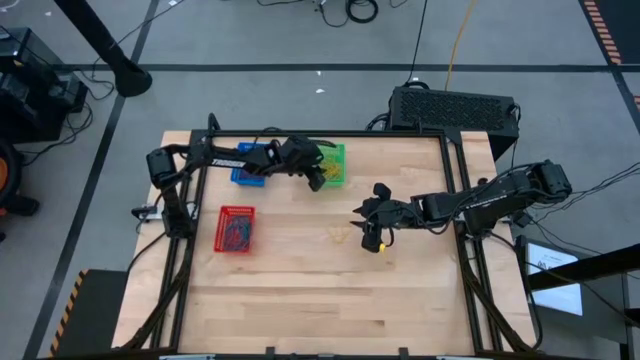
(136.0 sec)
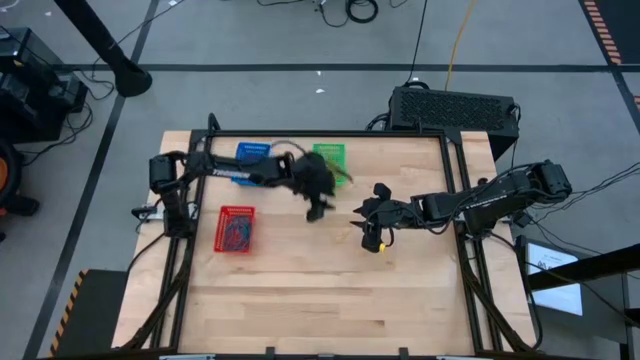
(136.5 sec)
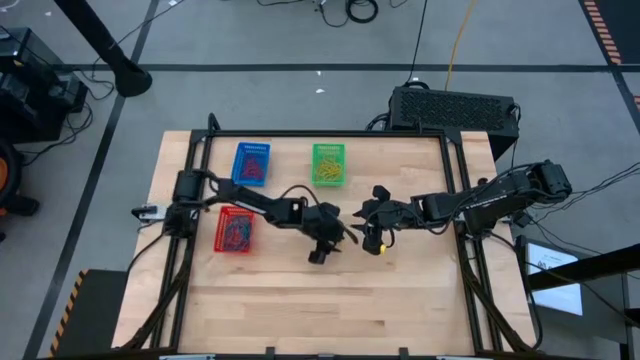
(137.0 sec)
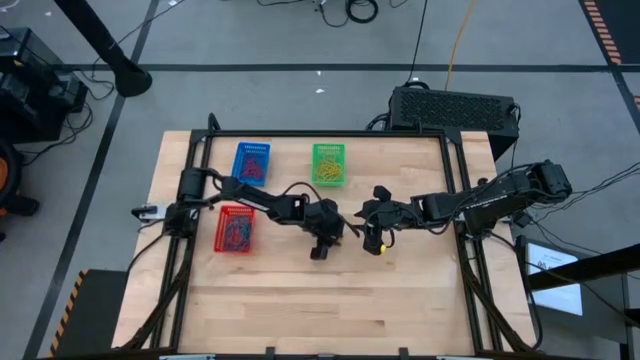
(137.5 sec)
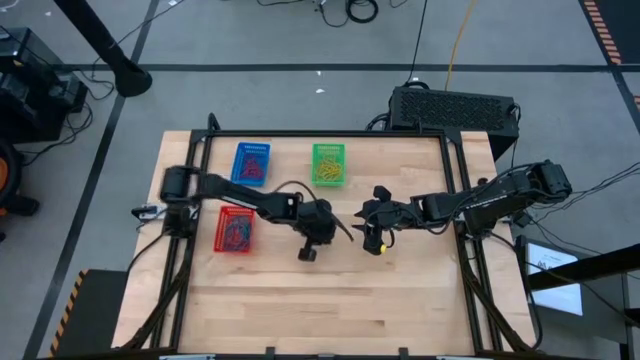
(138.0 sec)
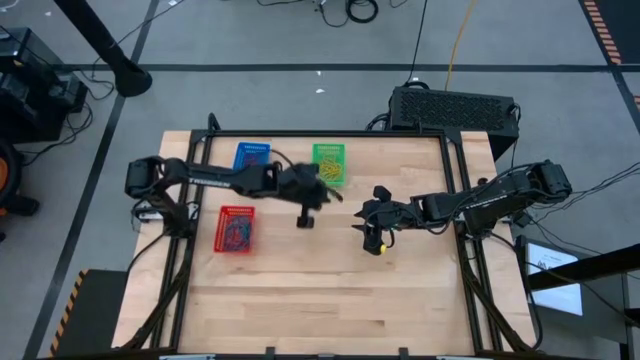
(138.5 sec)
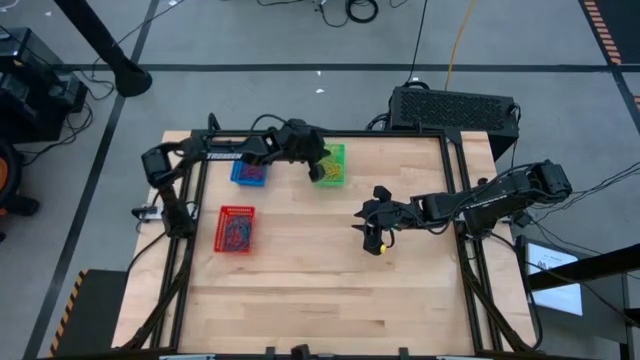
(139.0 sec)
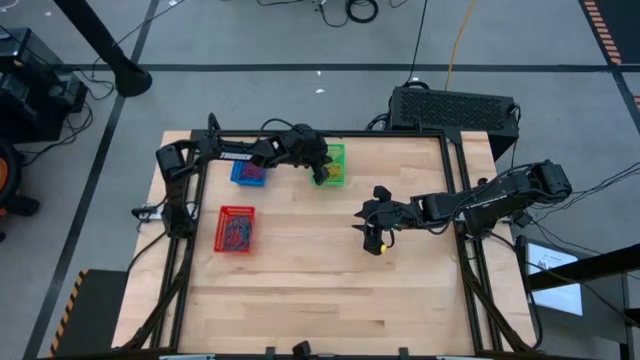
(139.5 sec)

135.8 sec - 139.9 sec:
Task: Sort rubber bands into baskets
Put the yellow rubber band into the green basket

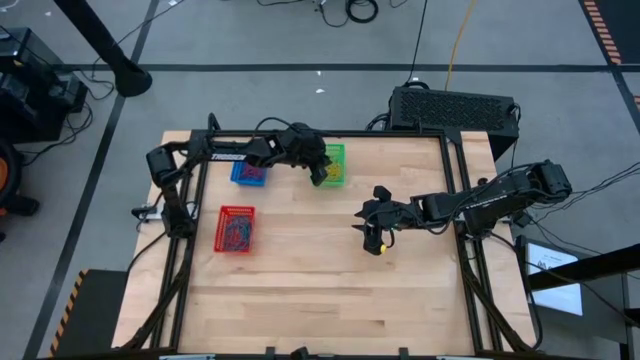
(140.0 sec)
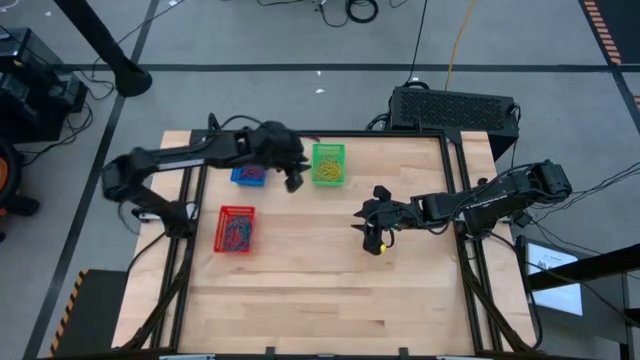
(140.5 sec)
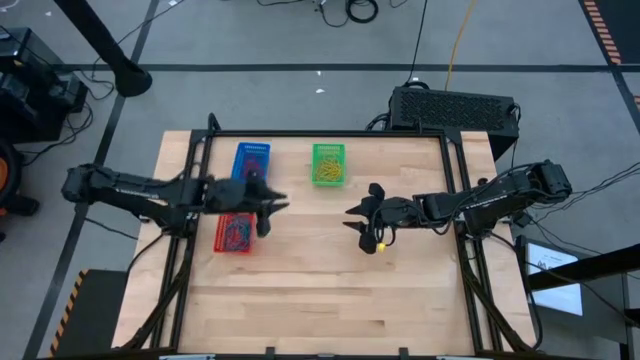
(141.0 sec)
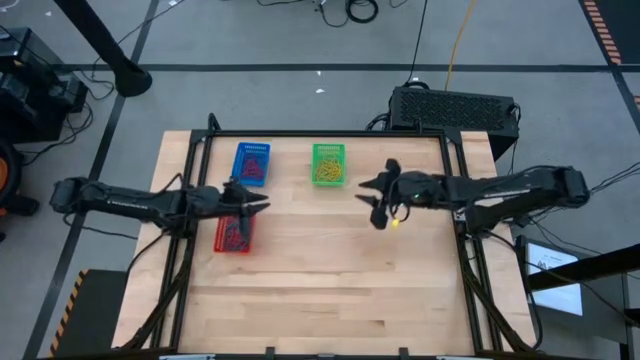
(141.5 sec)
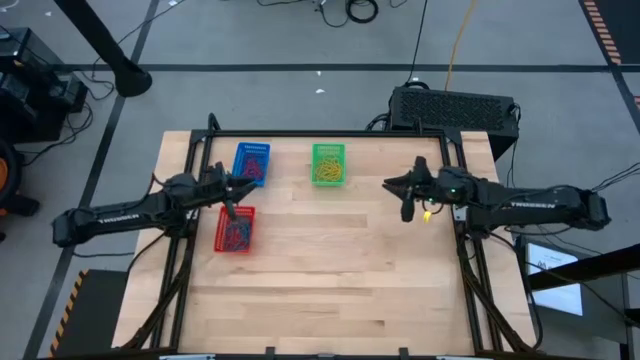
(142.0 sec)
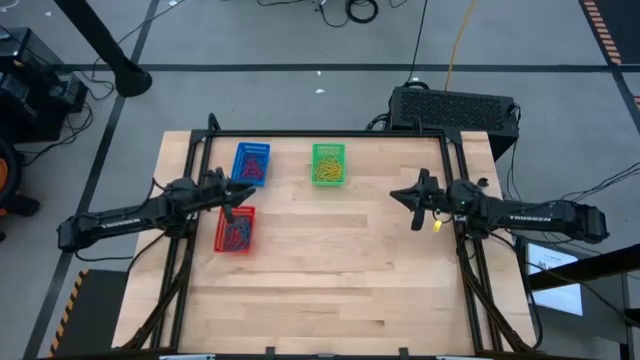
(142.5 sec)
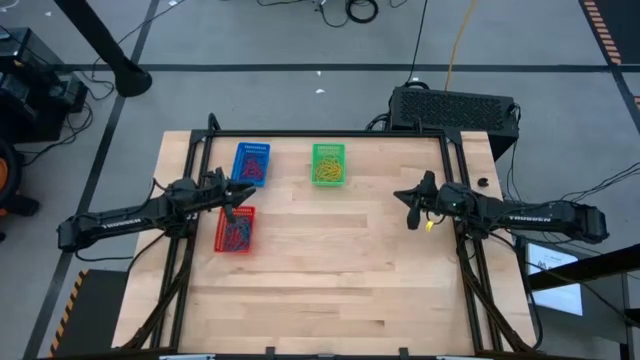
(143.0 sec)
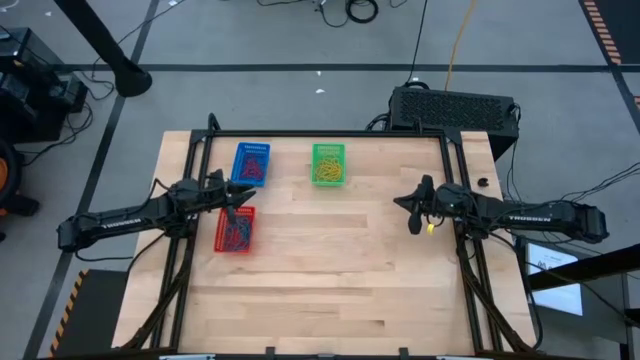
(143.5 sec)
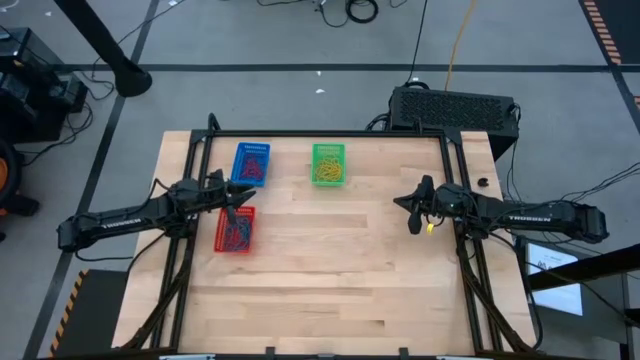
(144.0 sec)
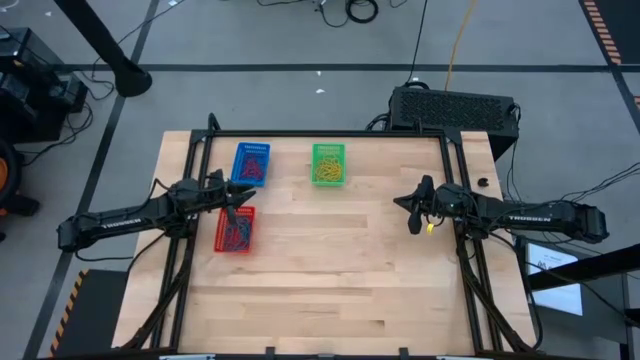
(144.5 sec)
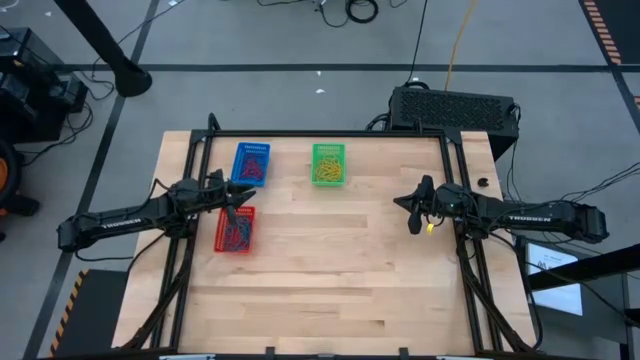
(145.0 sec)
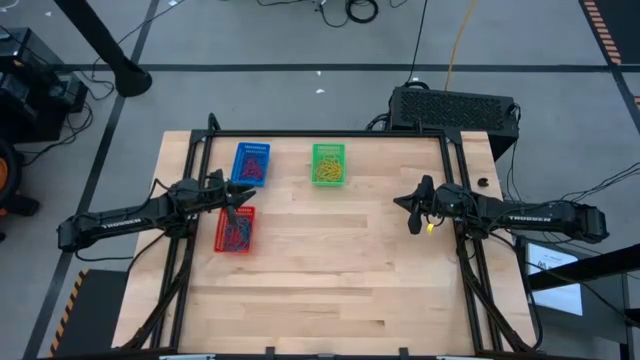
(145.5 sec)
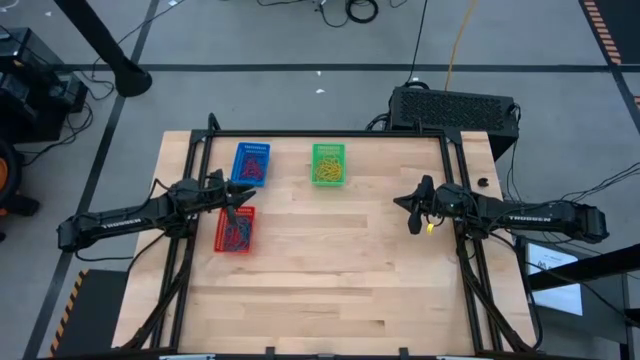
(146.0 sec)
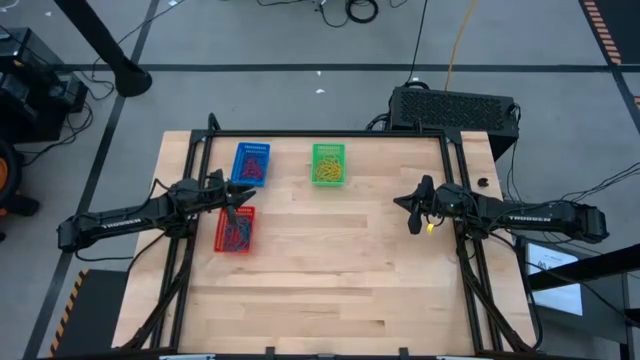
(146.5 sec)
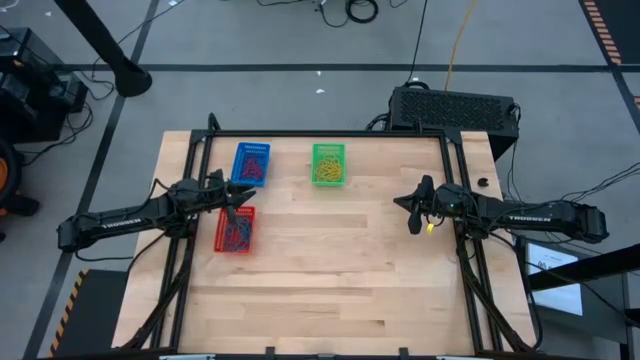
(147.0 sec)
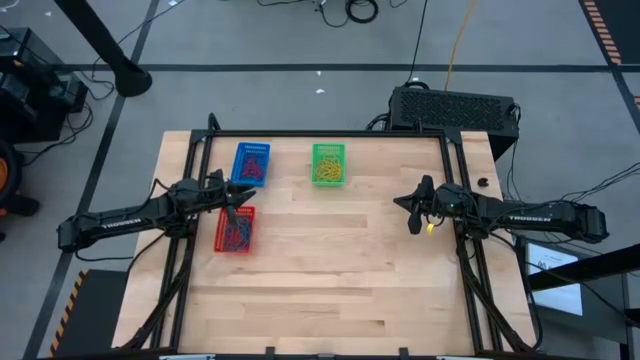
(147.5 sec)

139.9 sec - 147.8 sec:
Return to Home Position

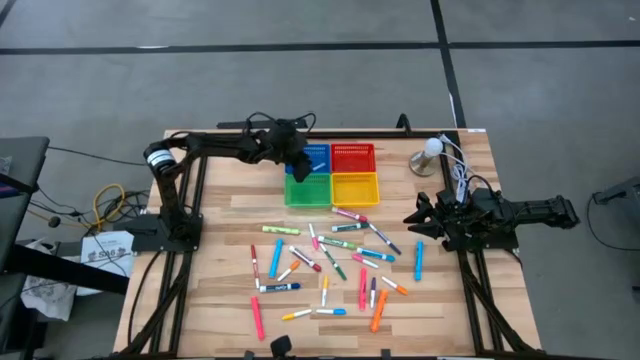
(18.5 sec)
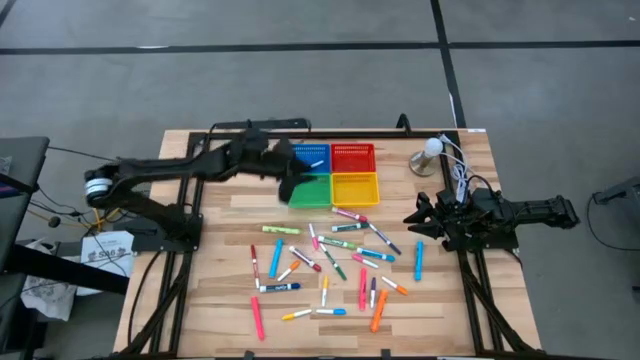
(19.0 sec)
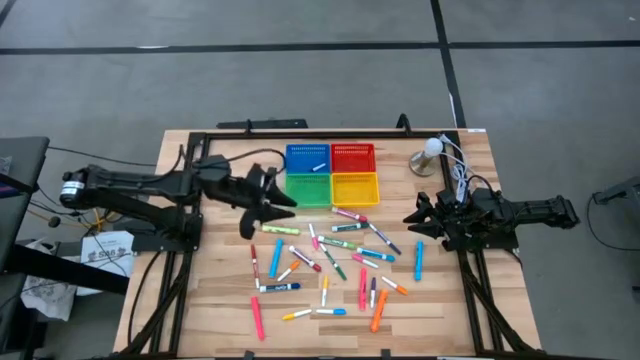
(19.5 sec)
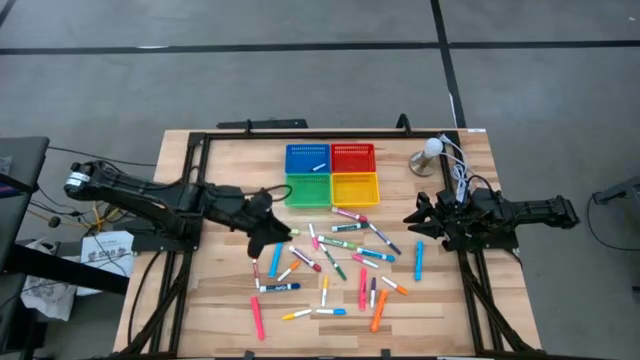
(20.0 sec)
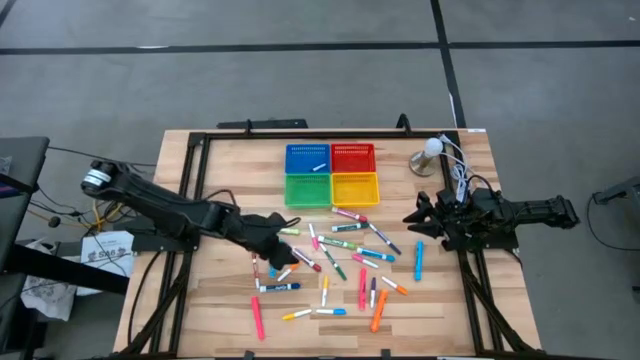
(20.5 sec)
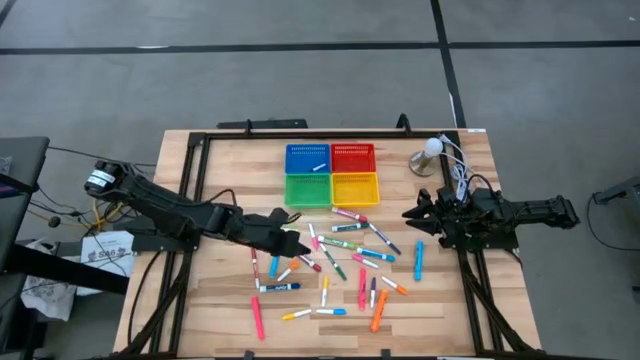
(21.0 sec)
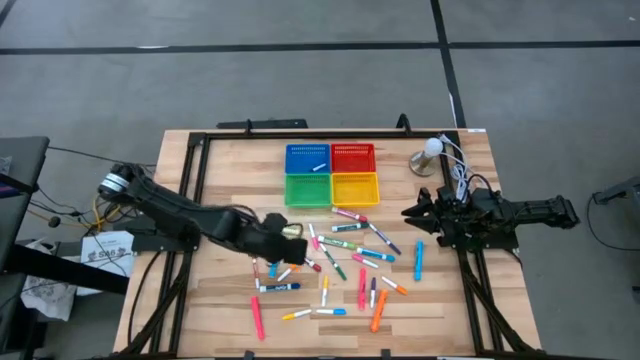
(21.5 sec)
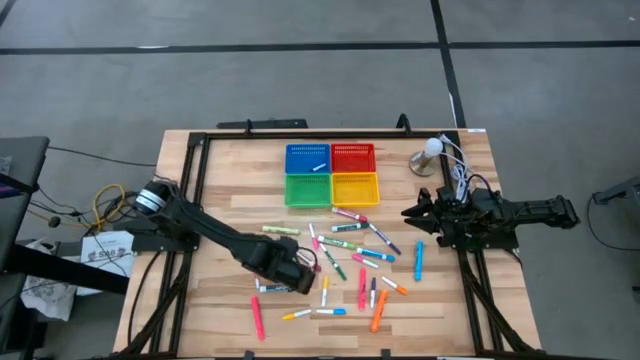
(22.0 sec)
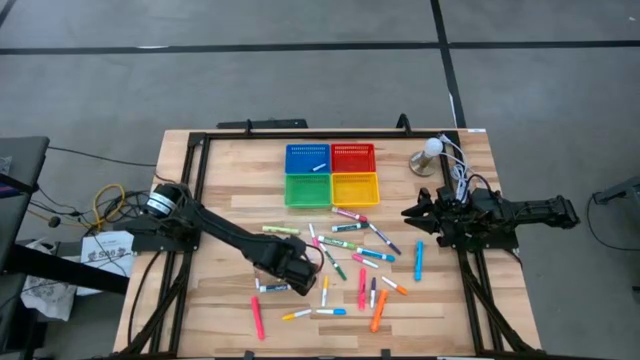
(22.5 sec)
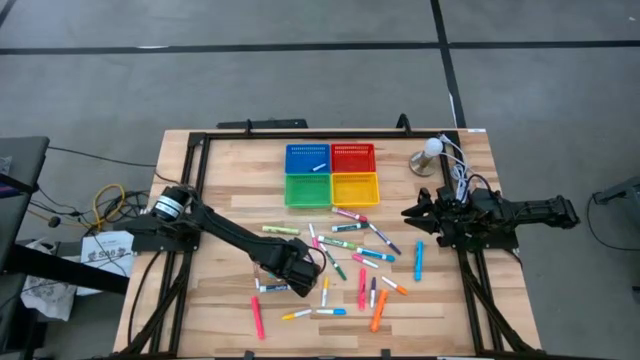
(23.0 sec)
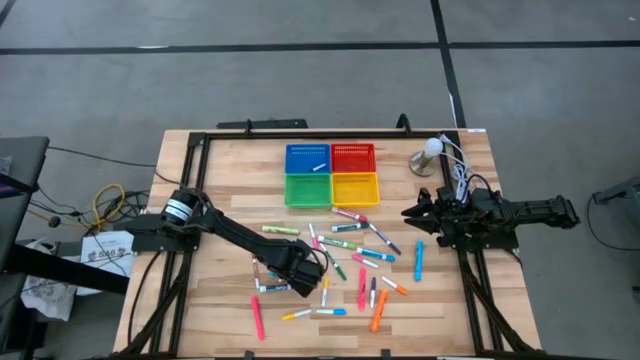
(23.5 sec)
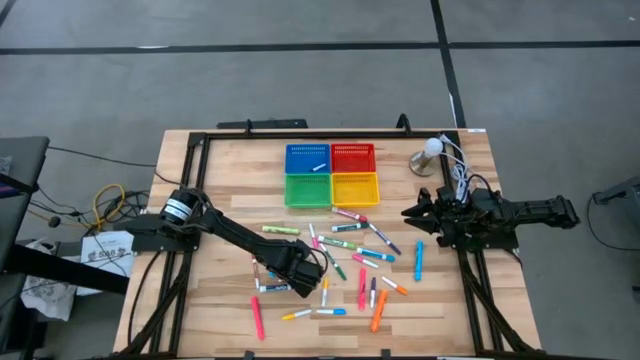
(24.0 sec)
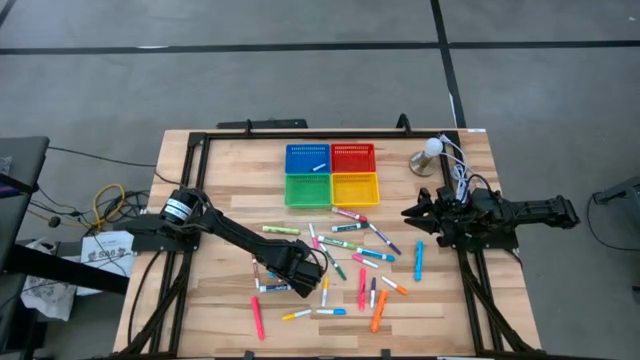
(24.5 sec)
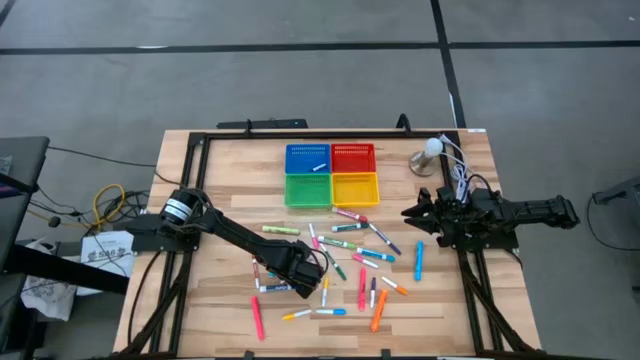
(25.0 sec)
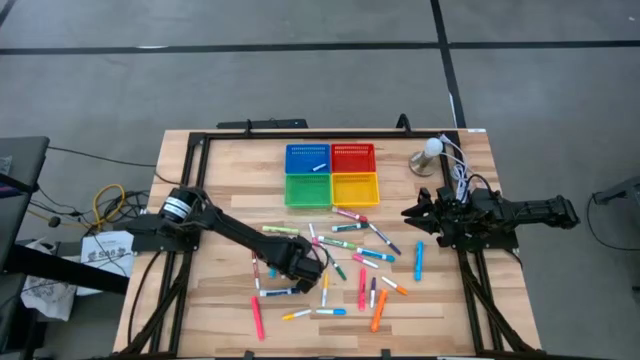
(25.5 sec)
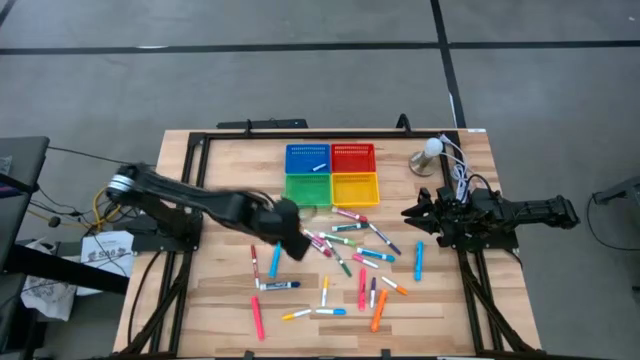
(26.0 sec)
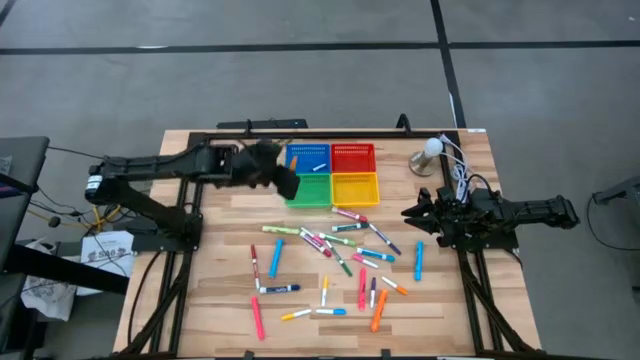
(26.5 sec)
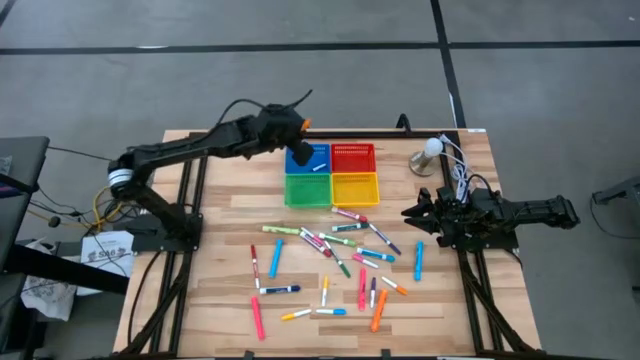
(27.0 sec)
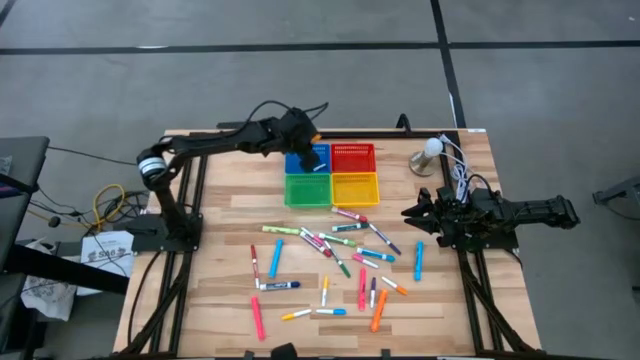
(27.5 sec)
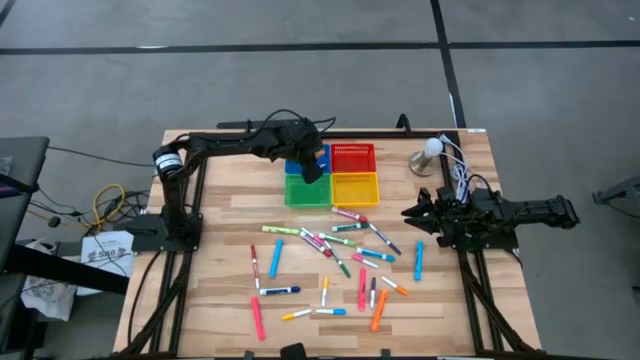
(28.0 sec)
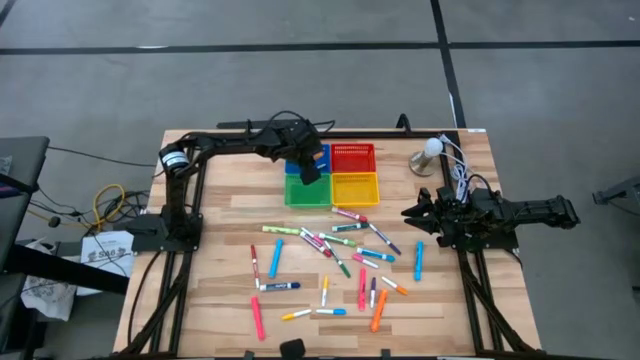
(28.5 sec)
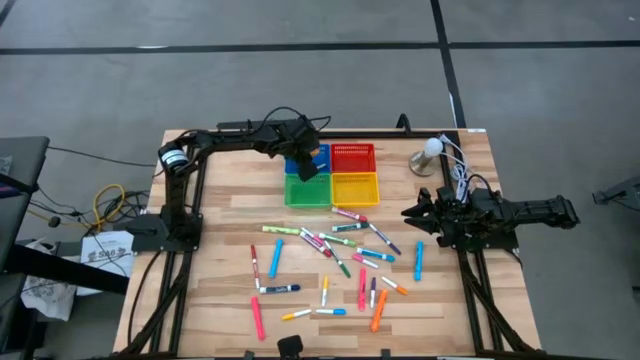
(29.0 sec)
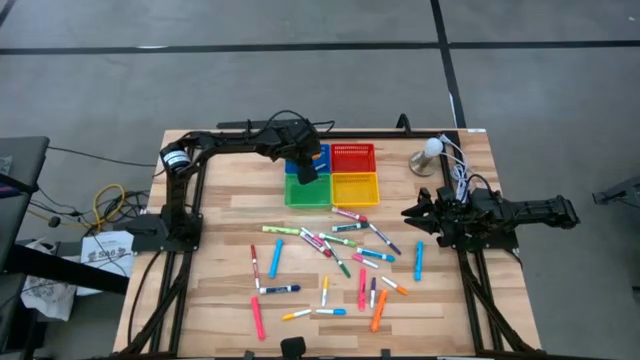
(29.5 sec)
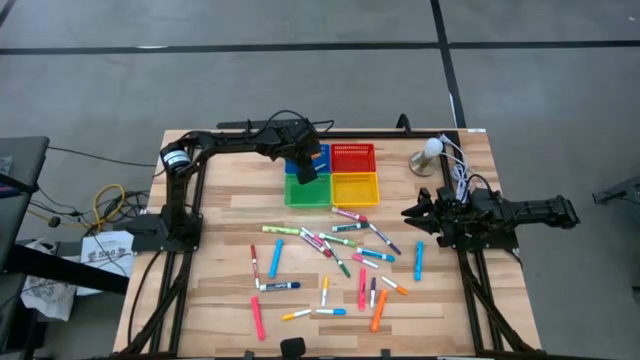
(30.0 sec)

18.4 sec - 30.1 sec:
Task: Pick & Place Markers
Put the left small orange marker into the blue bin
